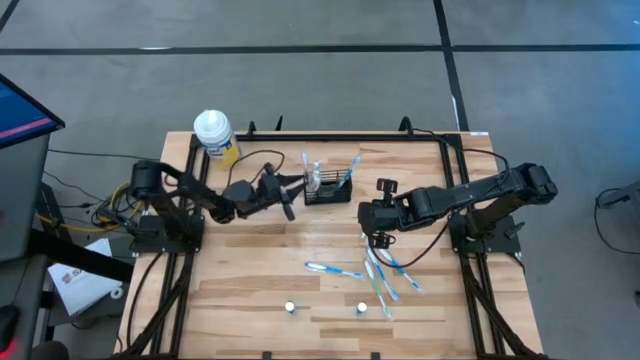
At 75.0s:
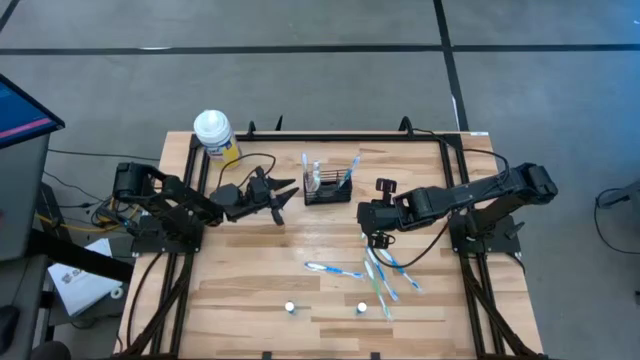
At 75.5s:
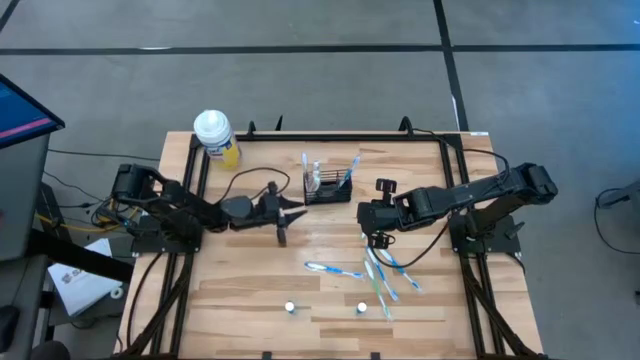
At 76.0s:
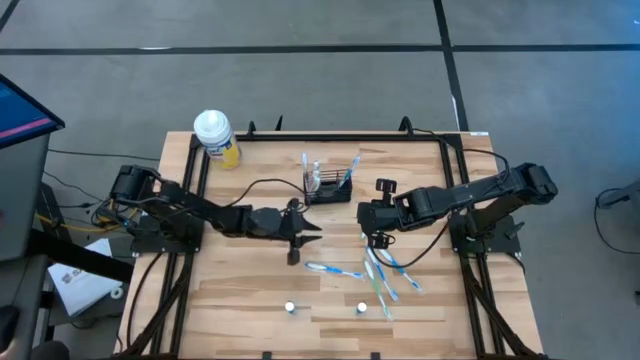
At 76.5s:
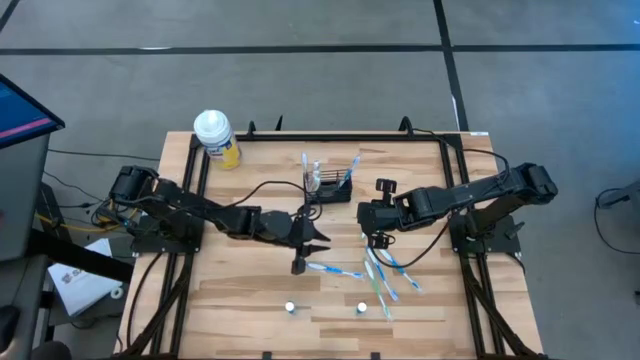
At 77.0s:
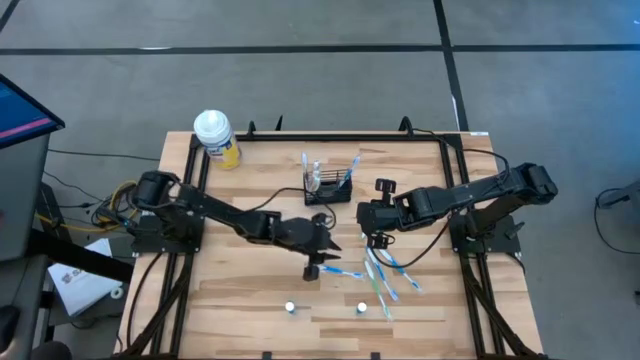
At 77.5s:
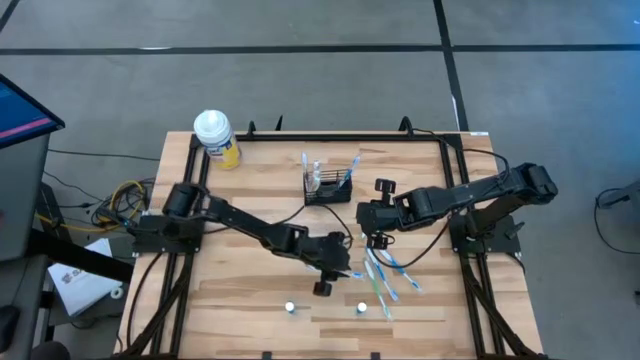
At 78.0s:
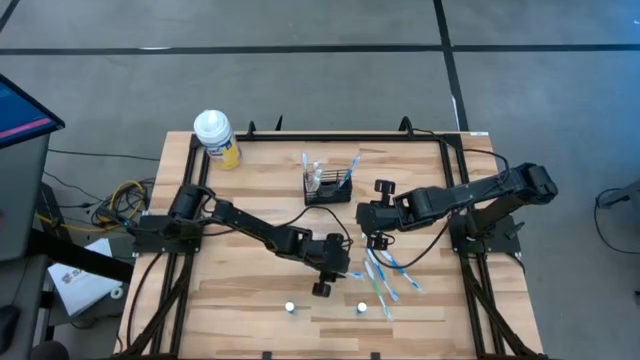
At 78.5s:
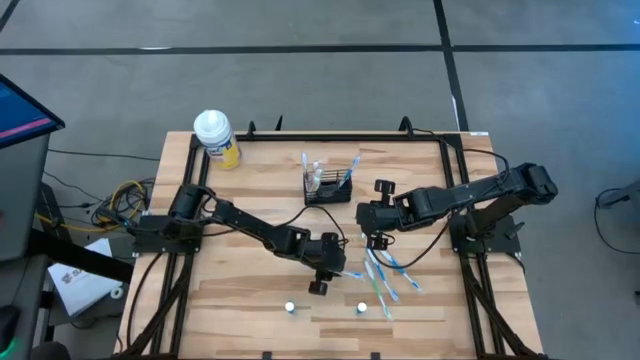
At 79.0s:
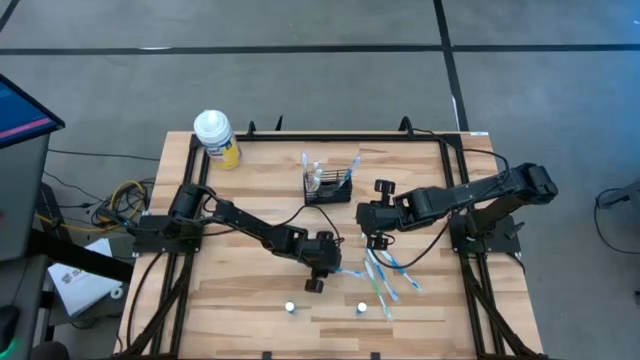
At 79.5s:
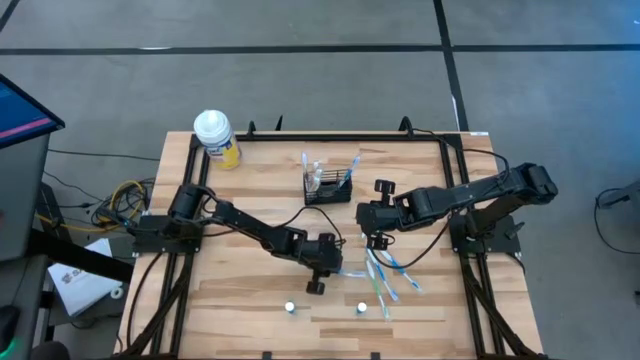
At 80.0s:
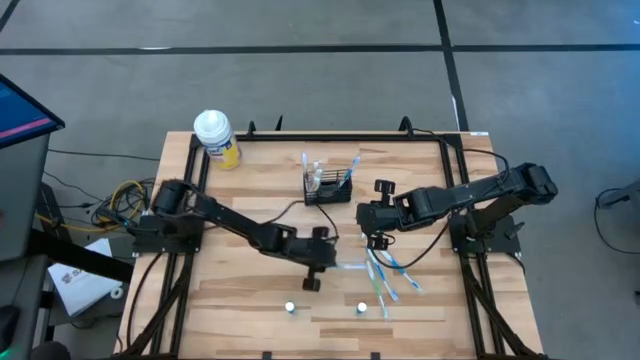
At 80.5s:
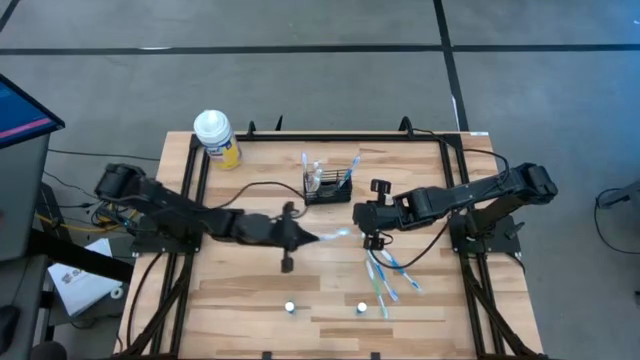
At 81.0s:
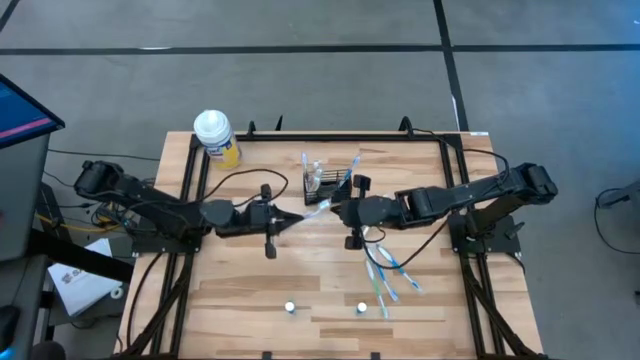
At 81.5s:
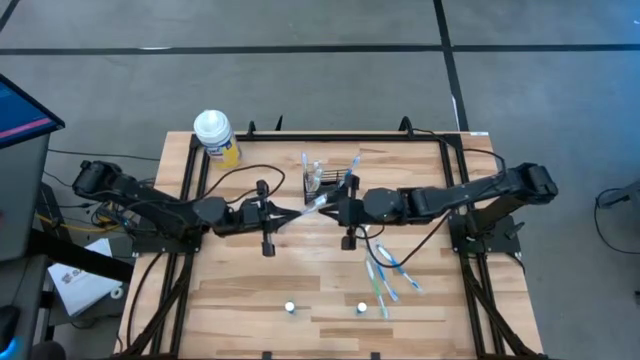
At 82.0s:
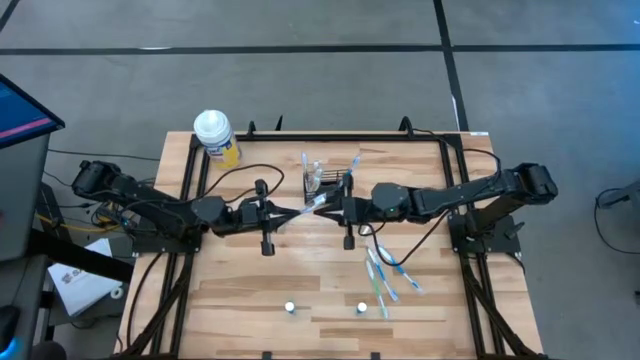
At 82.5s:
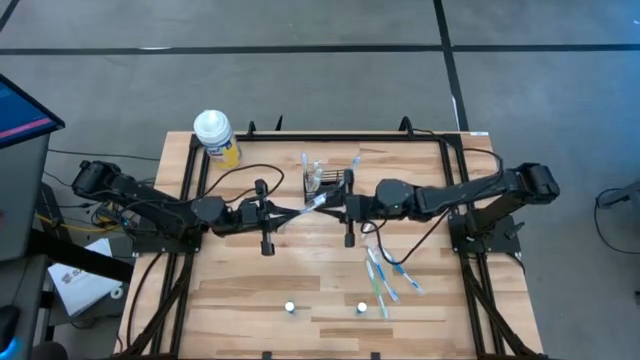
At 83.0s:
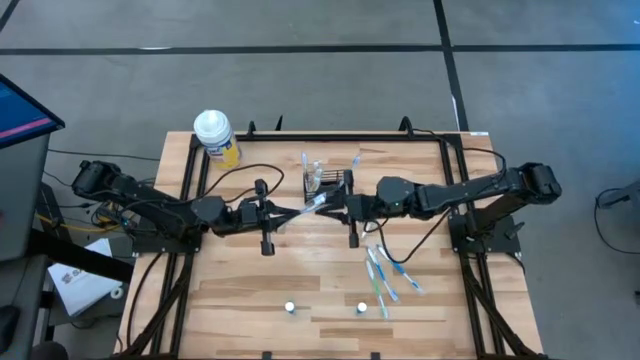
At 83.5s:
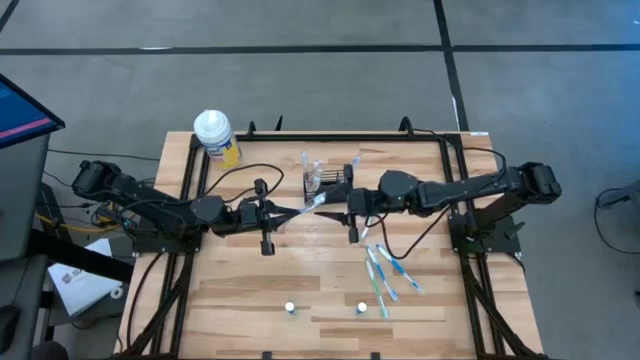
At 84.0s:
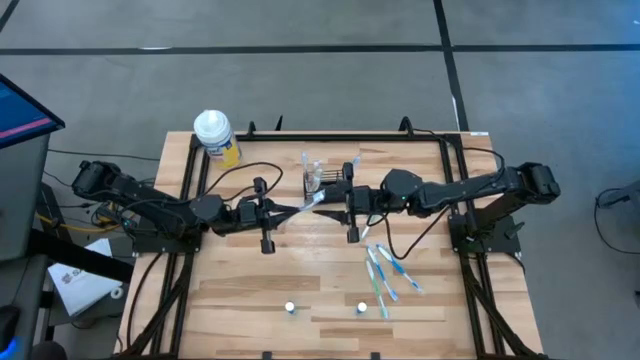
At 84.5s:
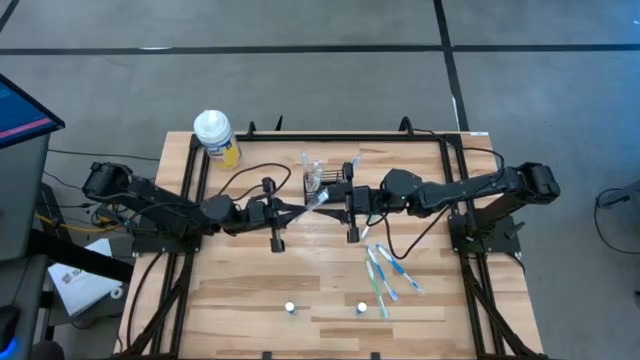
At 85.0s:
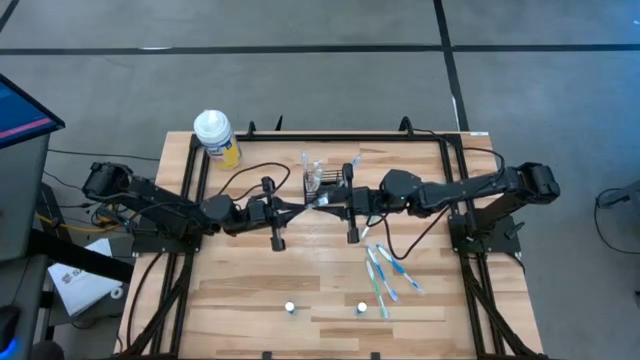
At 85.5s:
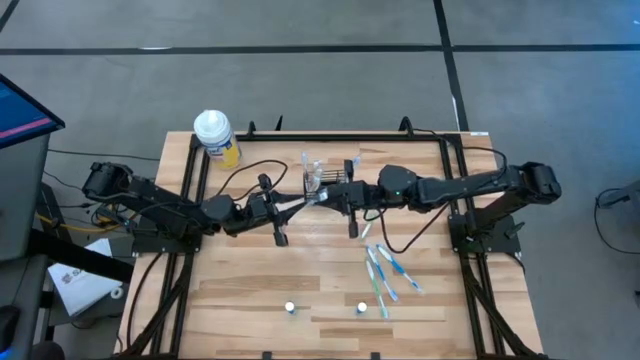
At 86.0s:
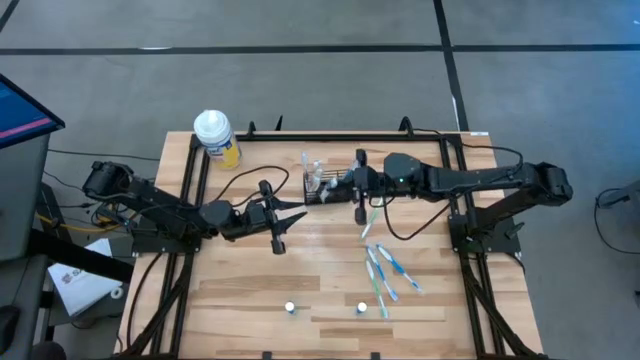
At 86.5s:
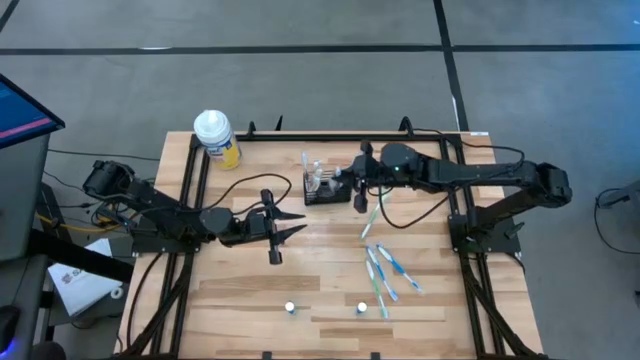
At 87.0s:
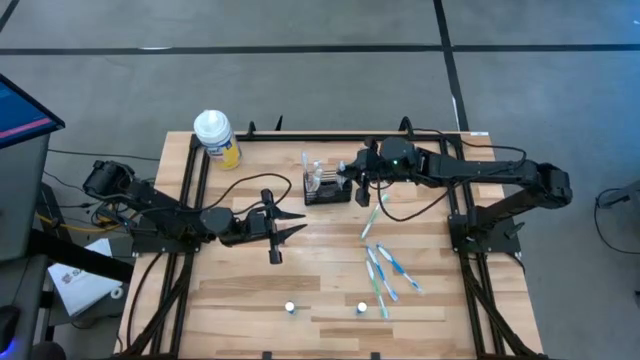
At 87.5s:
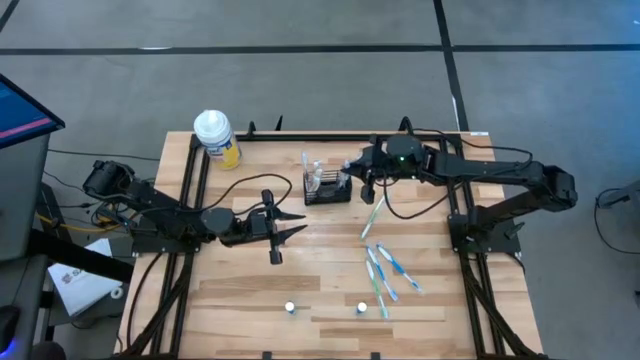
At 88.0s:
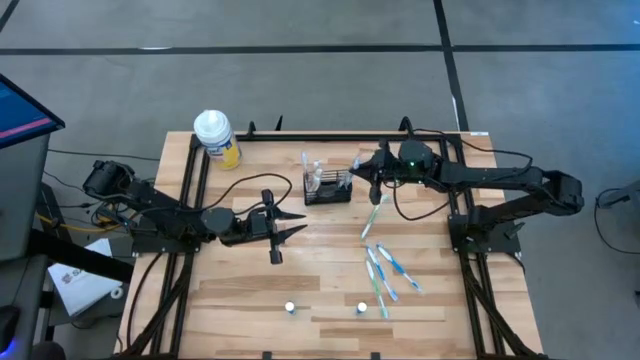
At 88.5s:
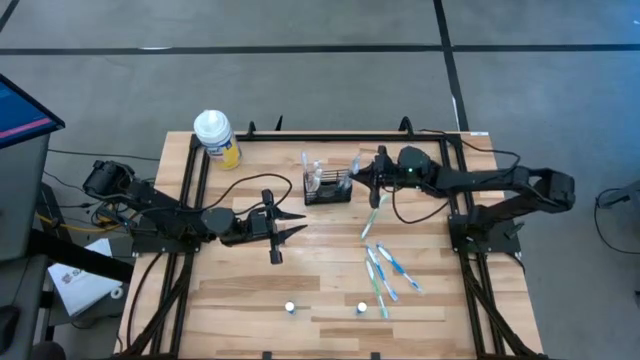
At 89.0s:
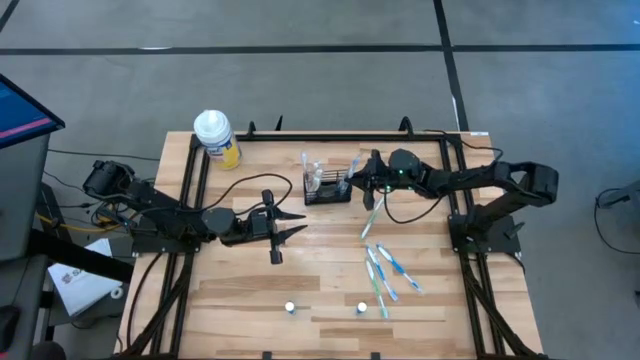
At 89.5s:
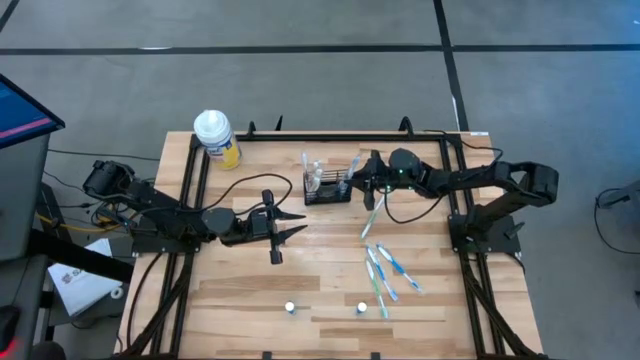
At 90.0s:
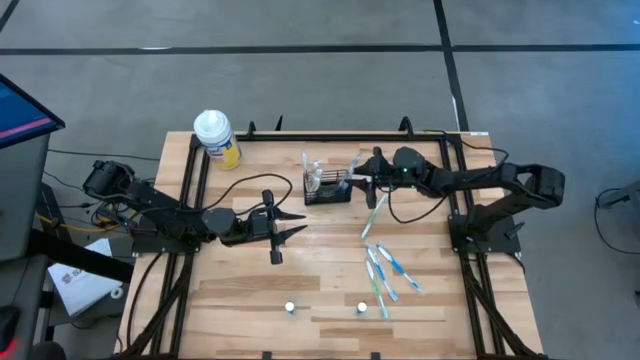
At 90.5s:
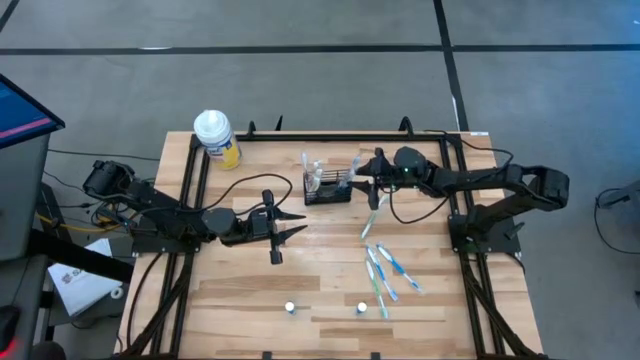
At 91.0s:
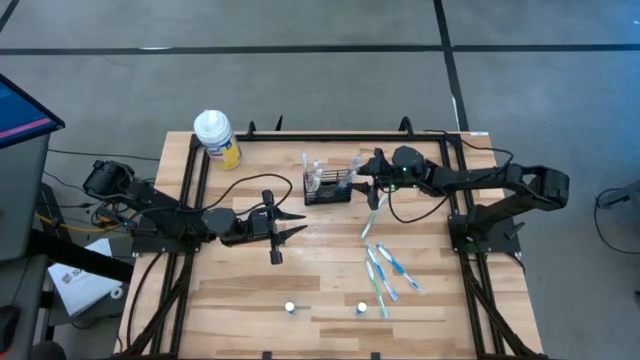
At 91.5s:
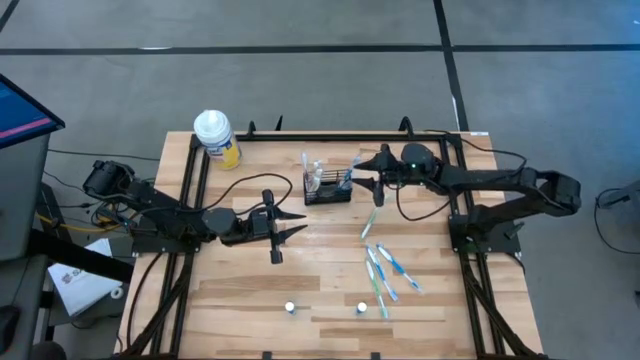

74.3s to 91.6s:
Task: Pick & Place toothbrushing station
Put the blue toothbrush into the black mesh organizer

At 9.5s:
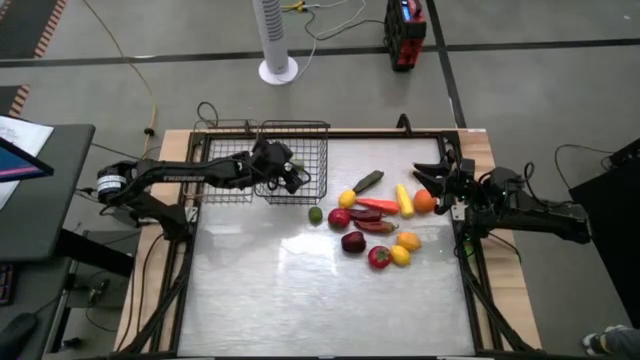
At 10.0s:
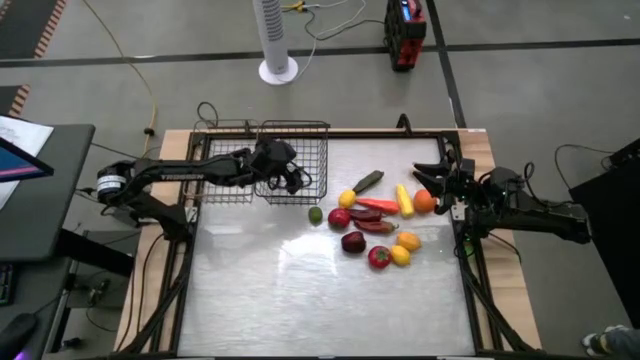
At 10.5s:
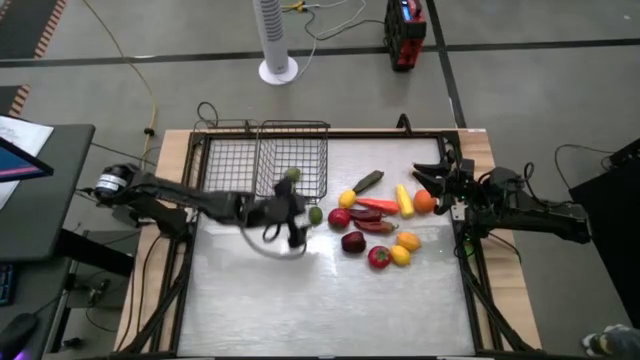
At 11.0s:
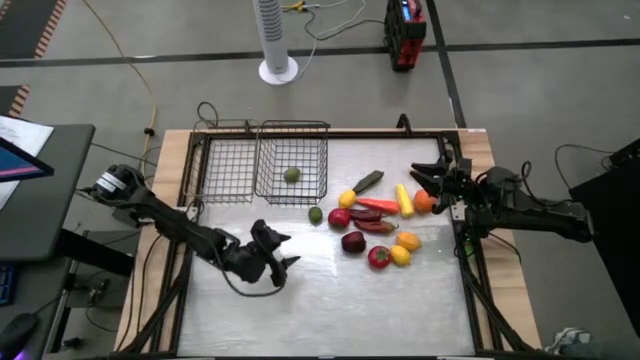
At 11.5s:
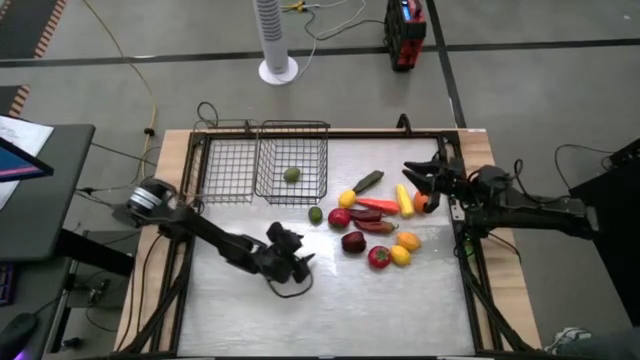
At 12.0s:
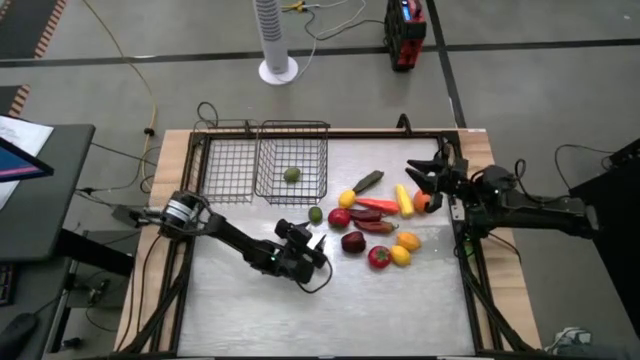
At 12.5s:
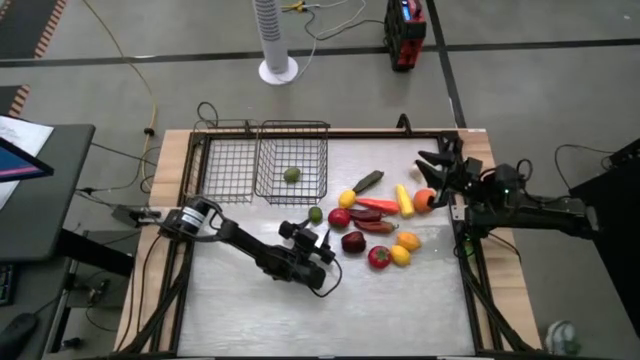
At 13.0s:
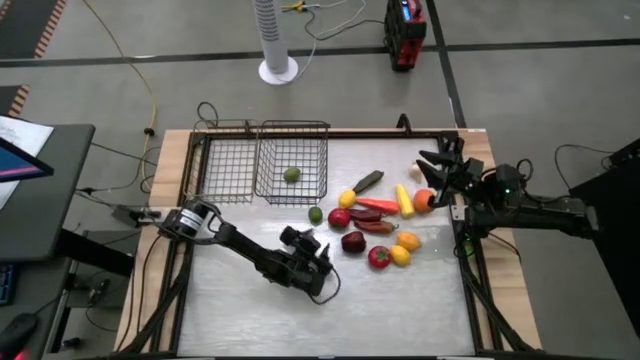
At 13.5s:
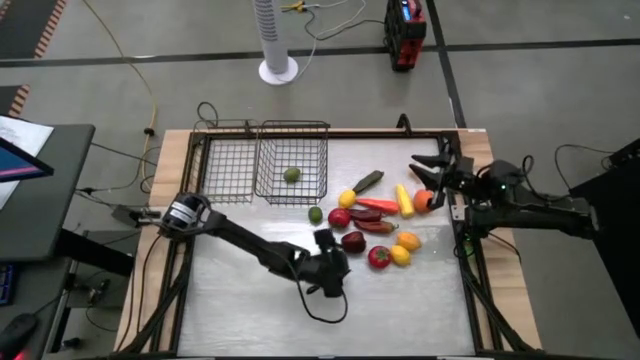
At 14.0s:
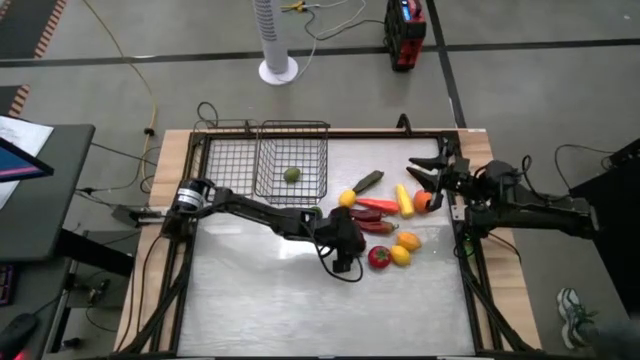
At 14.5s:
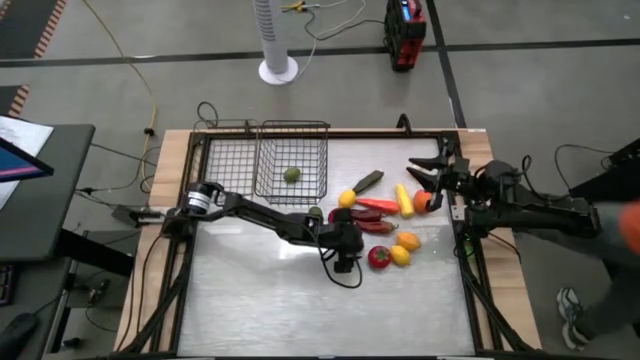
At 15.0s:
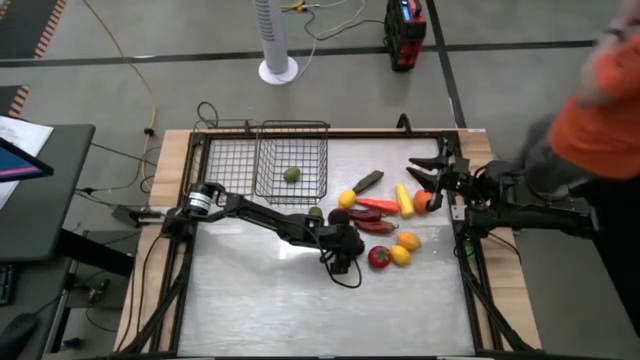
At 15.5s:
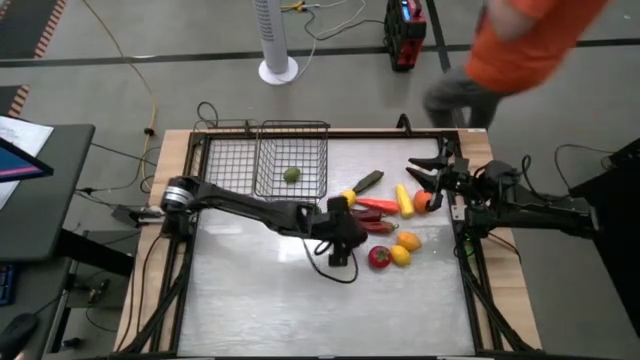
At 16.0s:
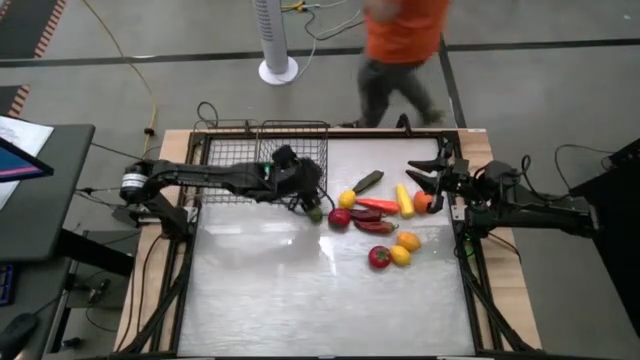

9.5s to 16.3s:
Task: Sort produce into baskets
Put the red apple into the right wire basket
